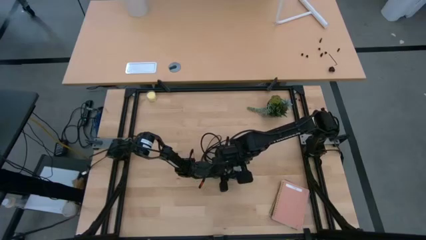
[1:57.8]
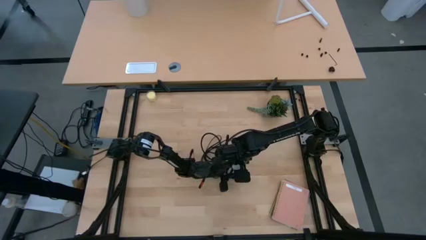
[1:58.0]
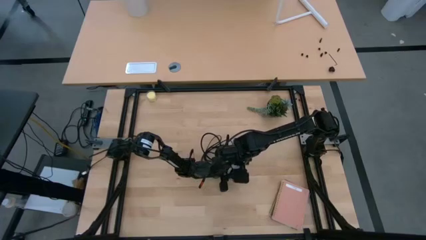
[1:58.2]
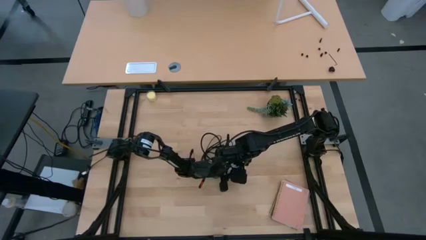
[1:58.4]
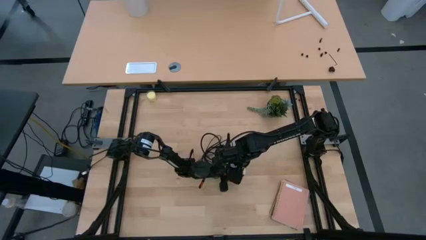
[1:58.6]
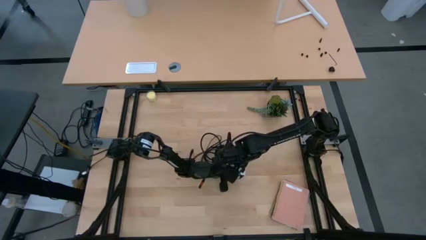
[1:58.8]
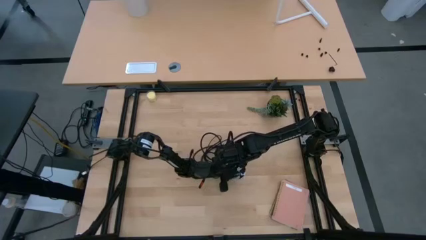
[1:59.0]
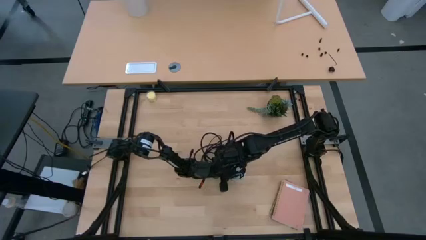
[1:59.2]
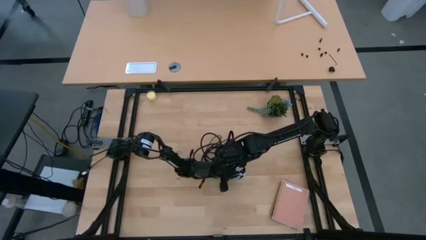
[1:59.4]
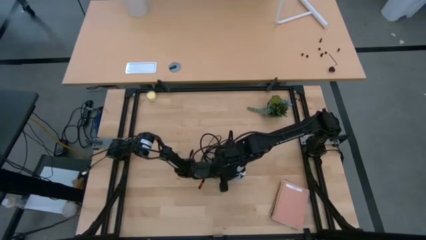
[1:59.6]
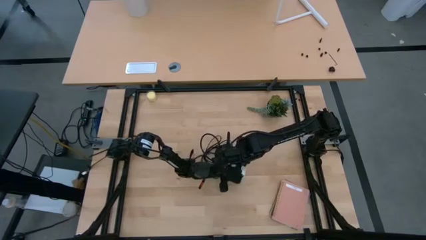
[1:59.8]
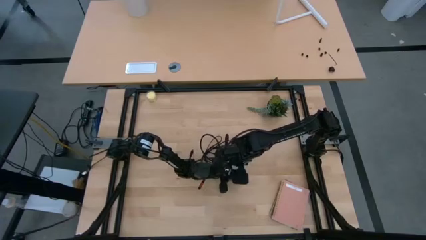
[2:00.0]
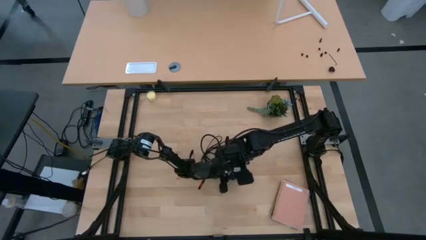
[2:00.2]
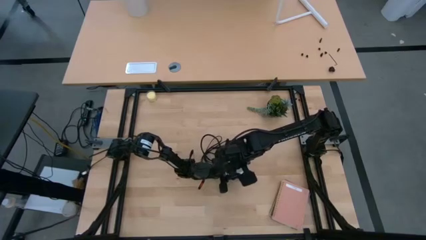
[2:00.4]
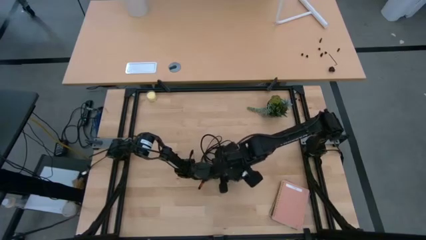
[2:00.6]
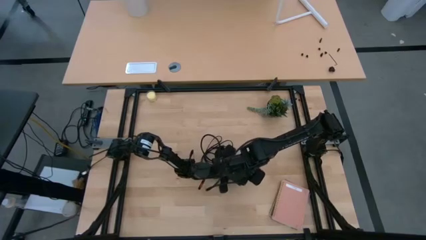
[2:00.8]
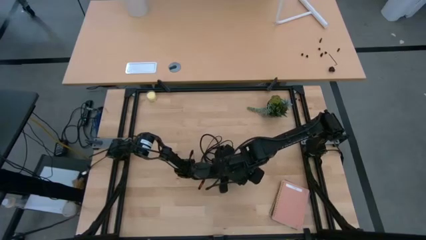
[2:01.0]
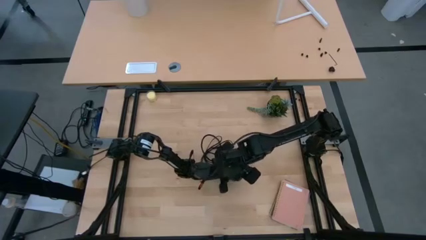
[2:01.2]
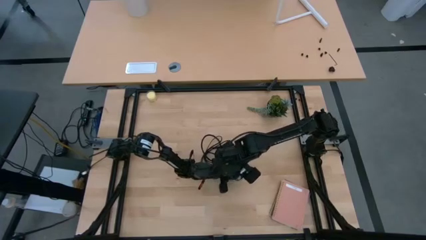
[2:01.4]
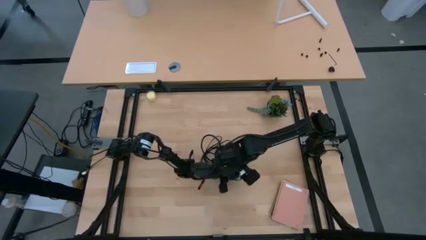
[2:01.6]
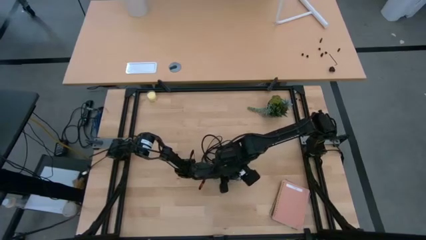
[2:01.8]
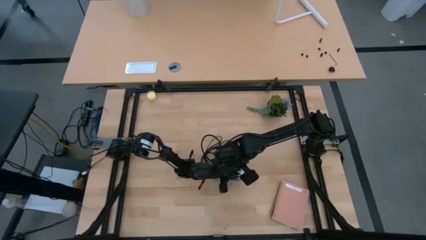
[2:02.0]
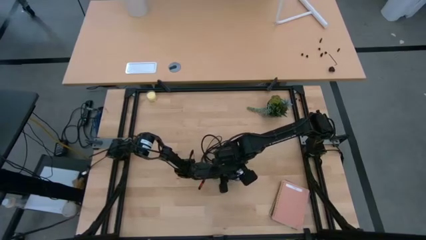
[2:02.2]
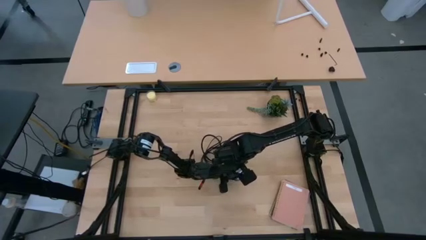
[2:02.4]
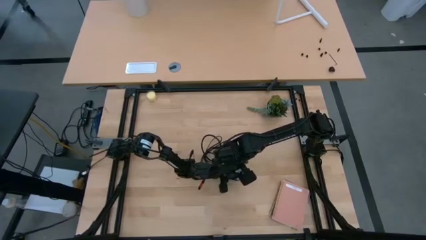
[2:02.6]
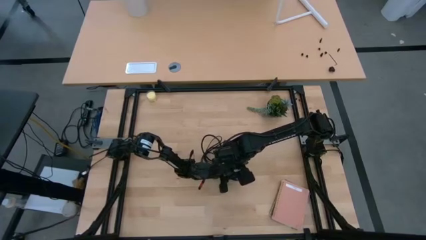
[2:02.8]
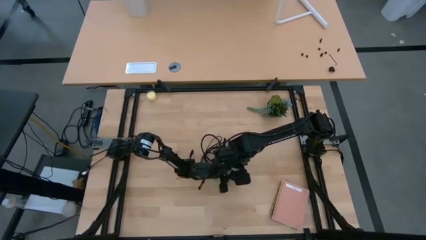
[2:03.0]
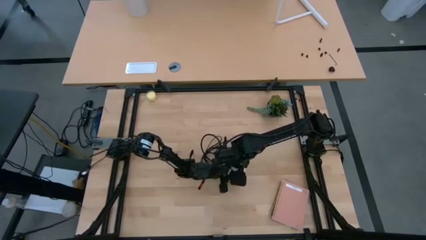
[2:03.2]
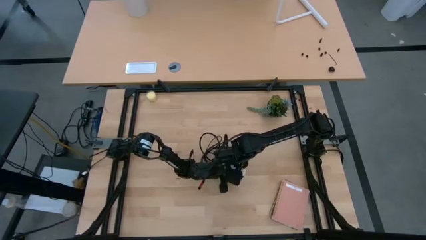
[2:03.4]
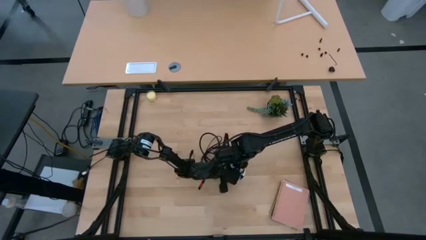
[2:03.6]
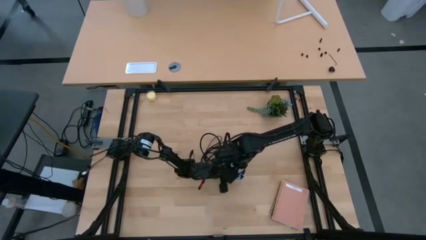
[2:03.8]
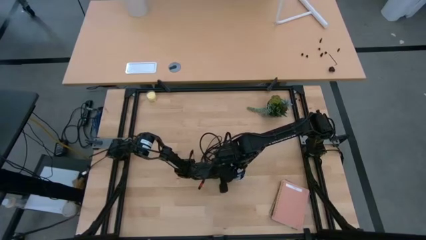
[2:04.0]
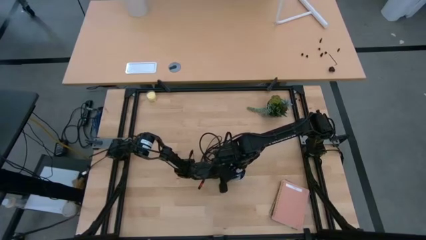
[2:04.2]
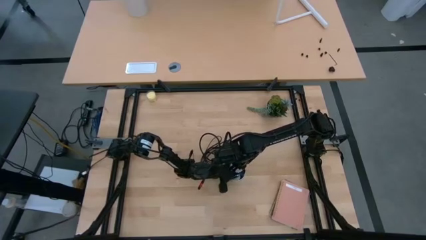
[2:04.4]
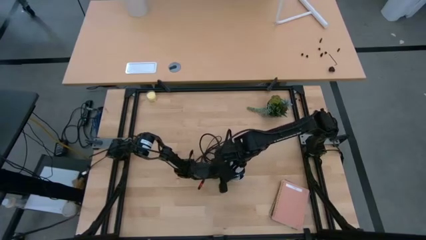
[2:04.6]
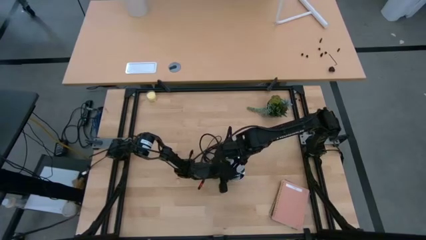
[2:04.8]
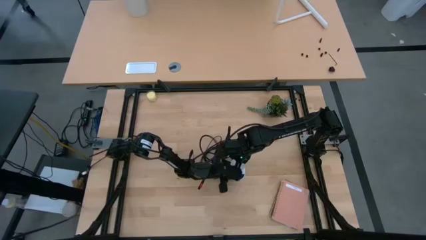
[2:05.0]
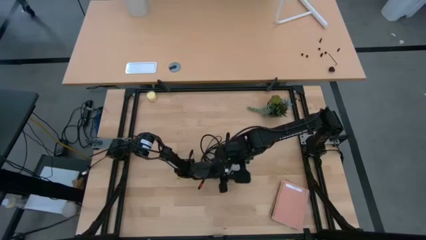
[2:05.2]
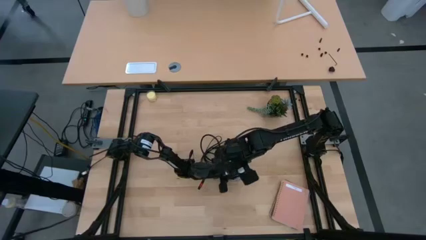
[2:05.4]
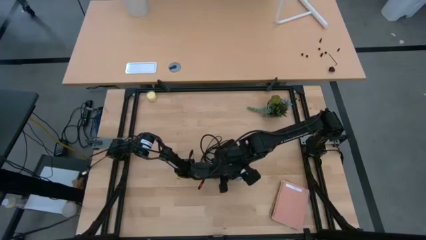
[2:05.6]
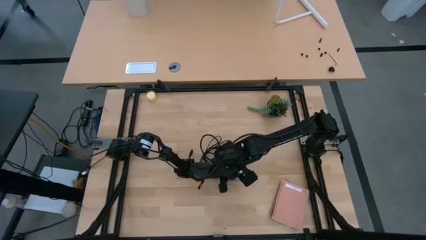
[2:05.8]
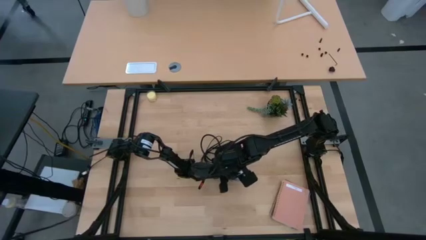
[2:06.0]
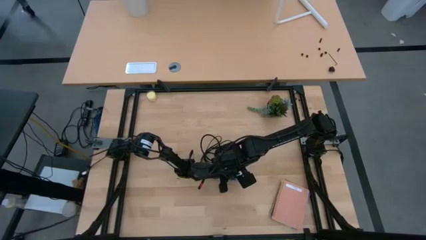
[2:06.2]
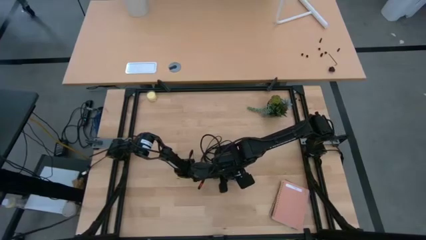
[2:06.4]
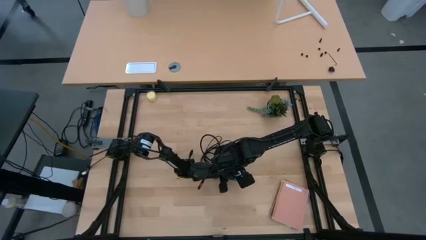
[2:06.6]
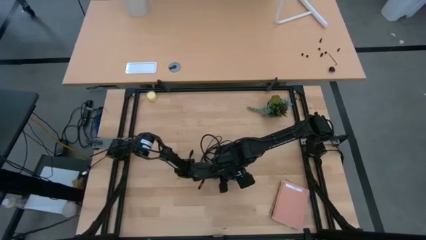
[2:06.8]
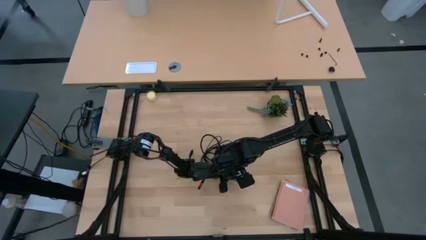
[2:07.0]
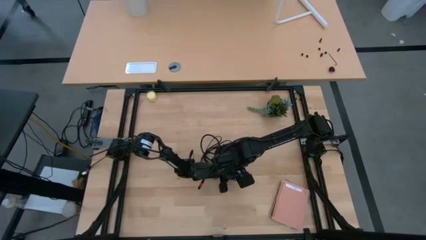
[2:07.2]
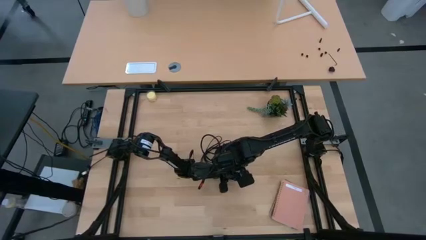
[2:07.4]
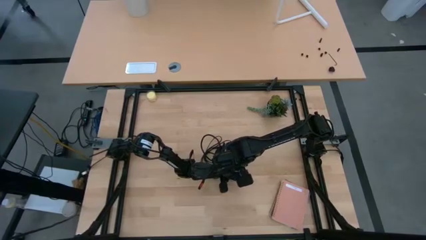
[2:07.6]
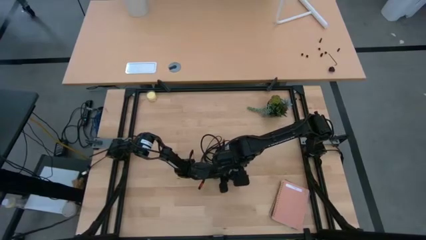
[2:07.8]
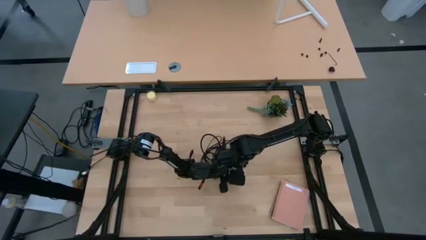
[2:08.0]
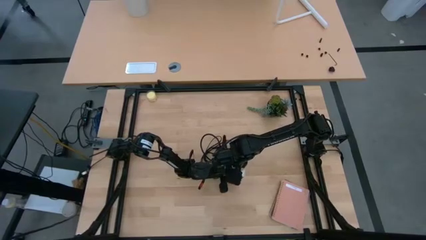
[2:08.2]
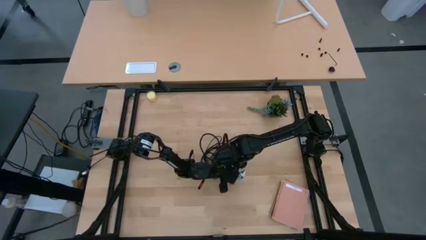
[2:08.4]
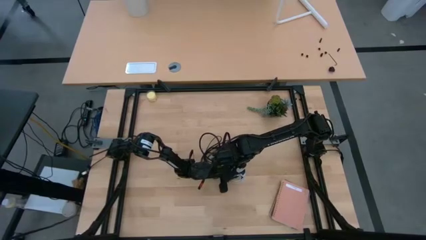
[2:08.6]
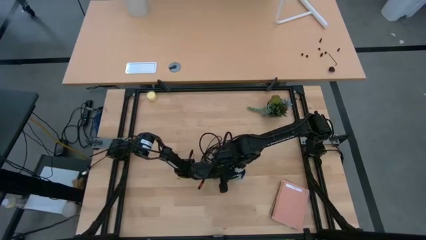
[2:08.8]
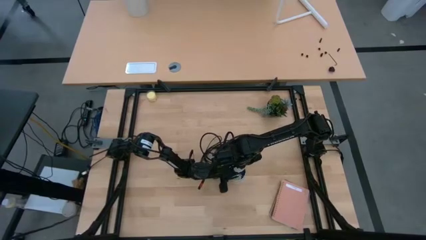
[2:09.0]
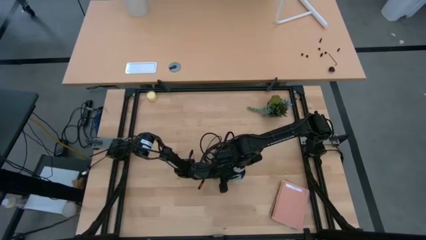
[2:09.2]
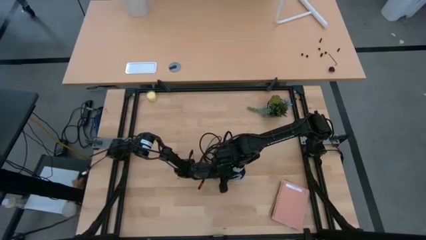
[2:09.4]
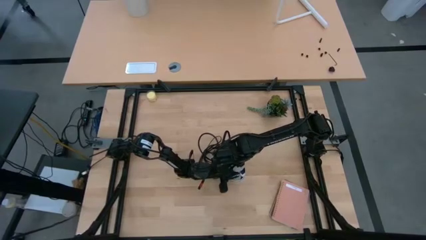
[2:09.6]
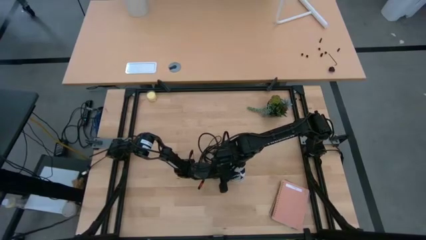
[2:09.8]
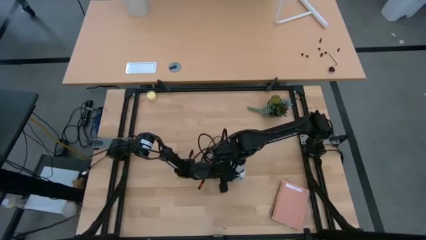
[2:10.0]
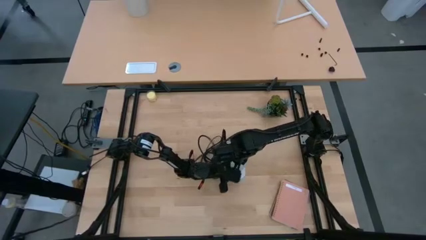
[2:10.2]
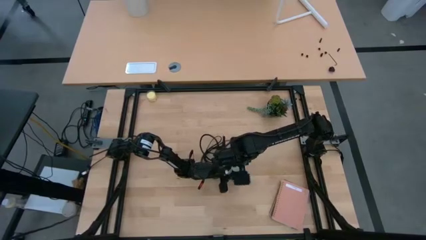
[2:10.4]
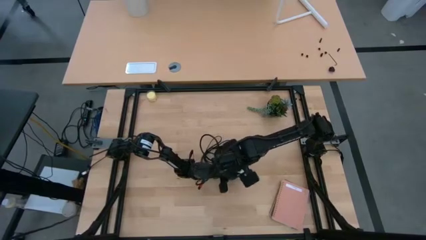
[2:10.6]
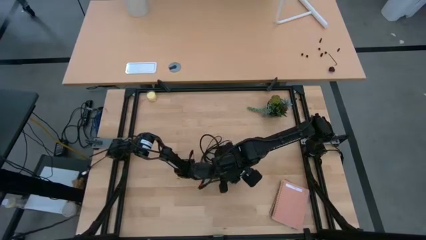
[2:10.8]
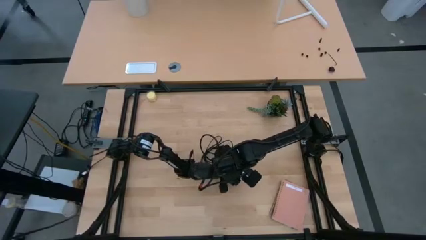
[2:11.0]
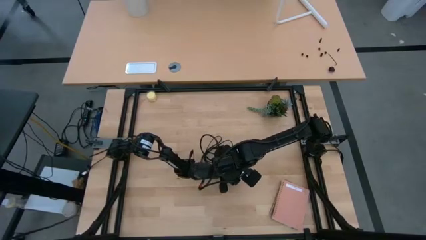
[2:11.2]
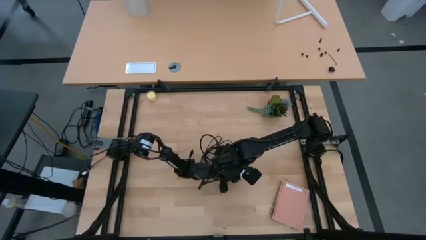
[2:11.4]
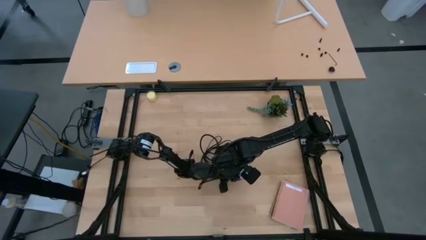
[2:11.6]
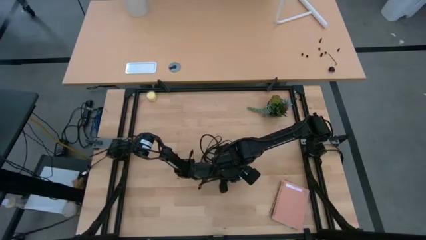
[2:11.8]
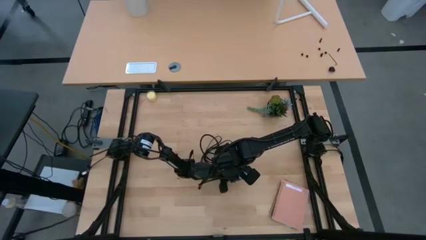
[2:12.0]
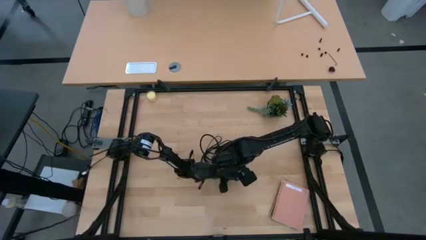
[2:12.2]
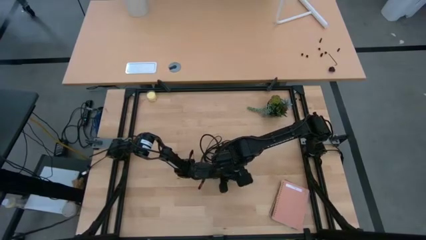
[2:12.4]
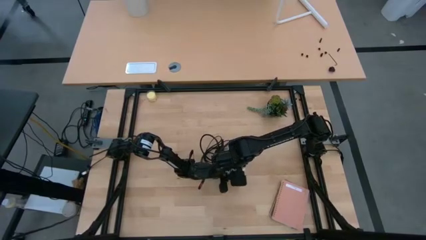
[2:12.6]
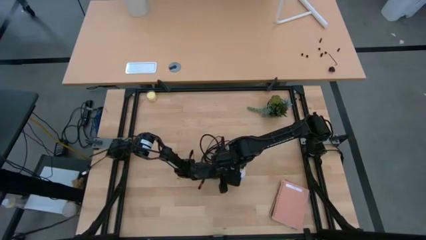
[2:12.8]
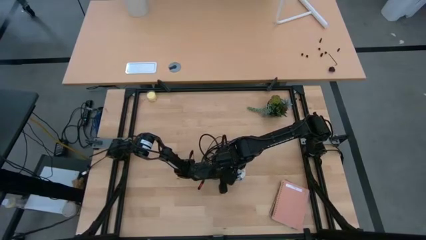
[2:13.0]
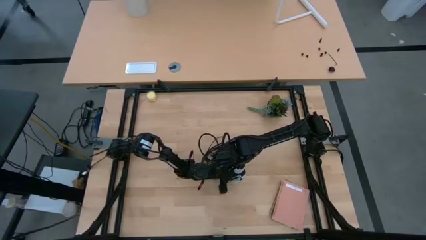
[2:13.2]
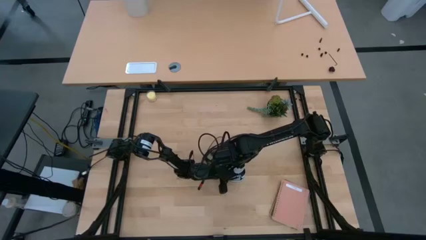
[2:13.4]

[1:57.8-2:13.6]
Task: Screw lightbulb
Insert the light bulb into the lamp
